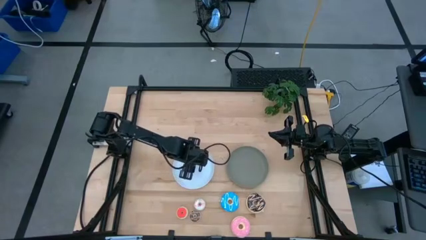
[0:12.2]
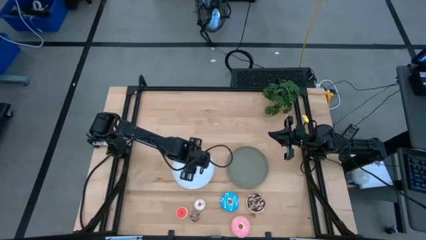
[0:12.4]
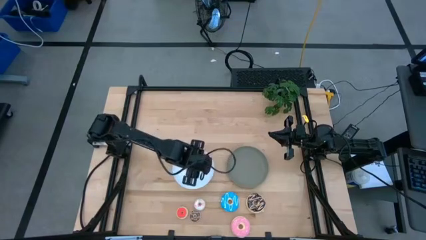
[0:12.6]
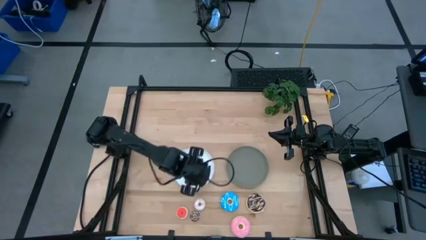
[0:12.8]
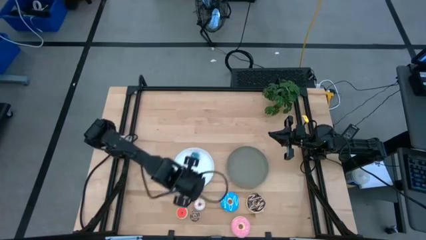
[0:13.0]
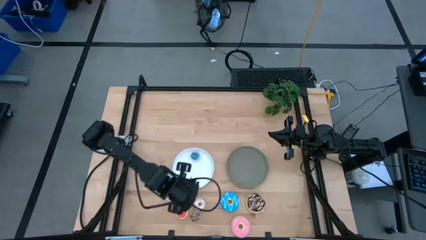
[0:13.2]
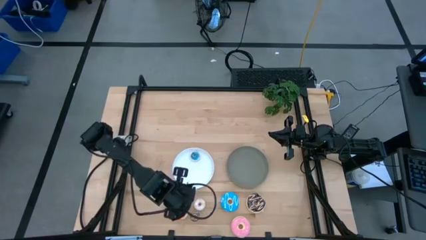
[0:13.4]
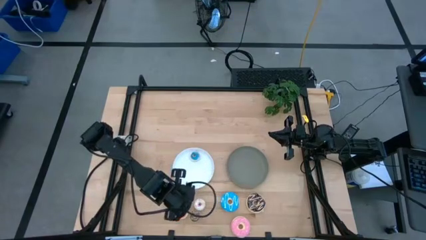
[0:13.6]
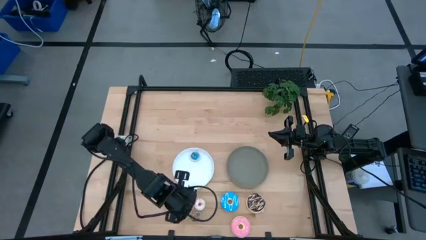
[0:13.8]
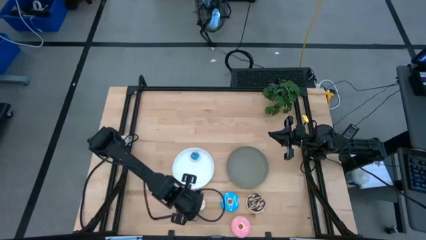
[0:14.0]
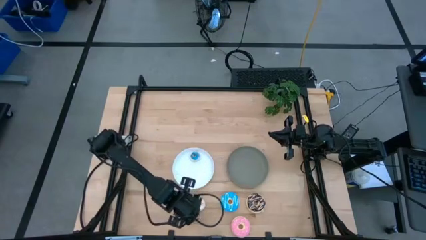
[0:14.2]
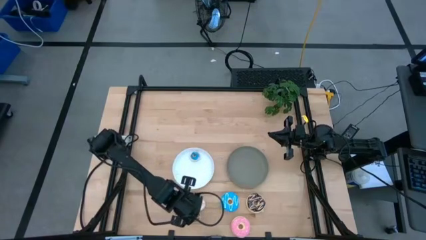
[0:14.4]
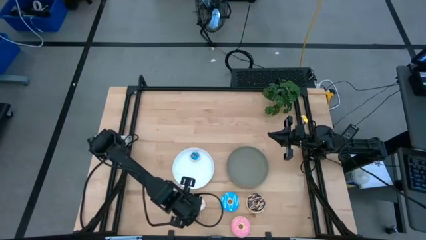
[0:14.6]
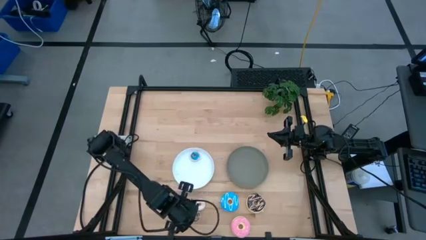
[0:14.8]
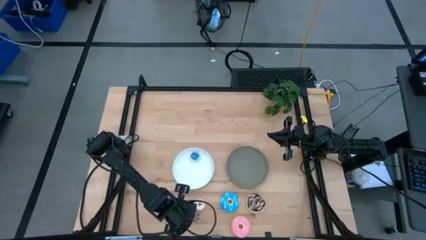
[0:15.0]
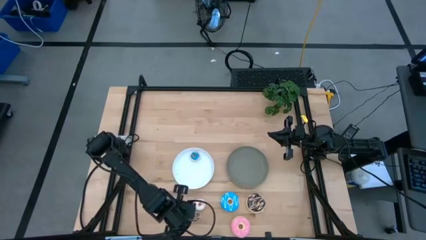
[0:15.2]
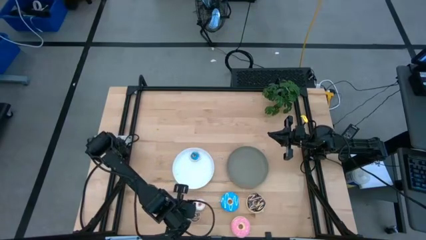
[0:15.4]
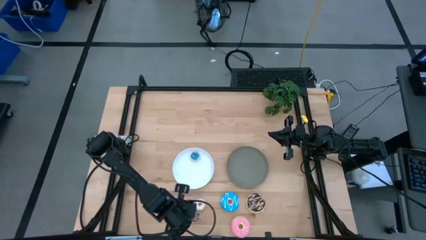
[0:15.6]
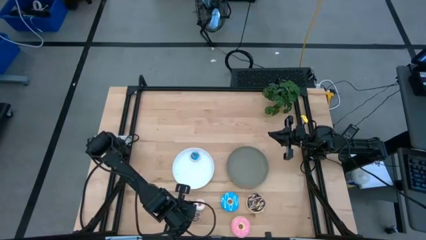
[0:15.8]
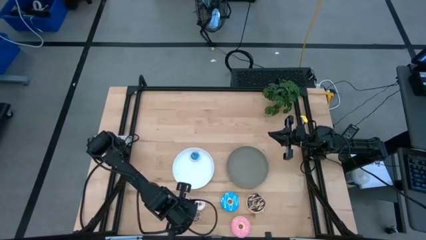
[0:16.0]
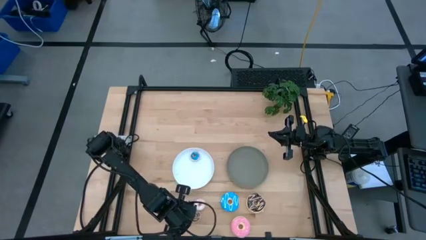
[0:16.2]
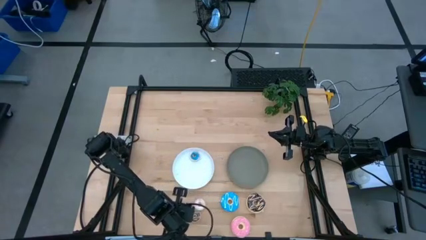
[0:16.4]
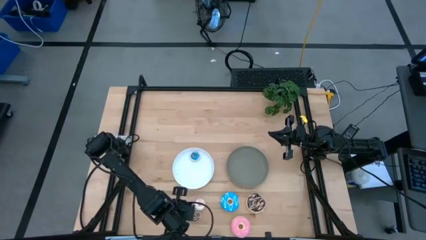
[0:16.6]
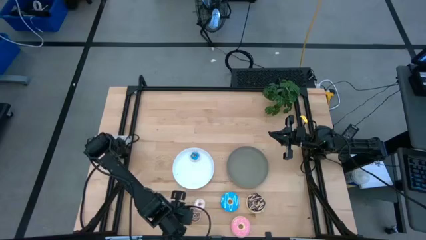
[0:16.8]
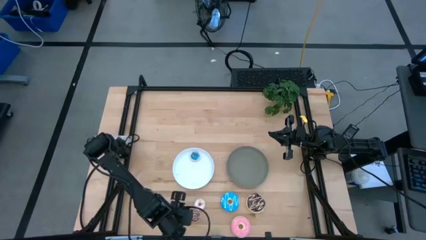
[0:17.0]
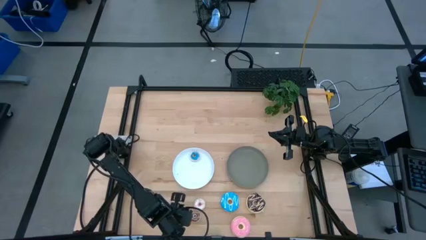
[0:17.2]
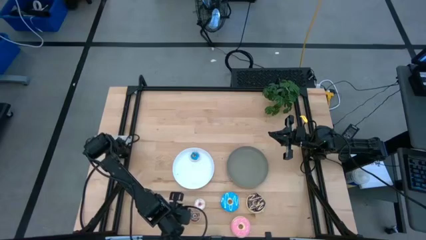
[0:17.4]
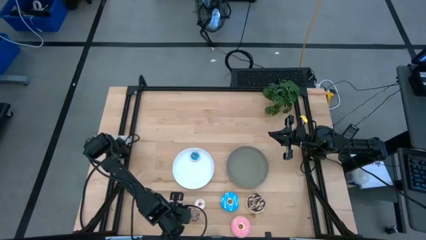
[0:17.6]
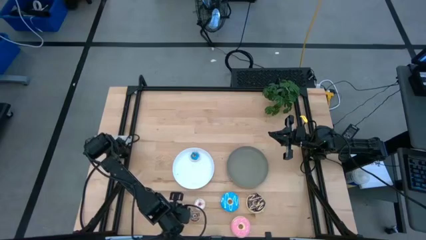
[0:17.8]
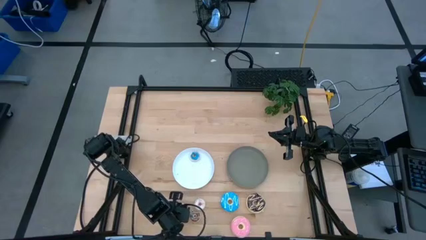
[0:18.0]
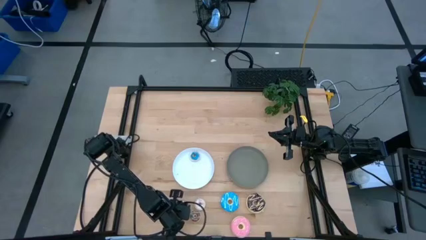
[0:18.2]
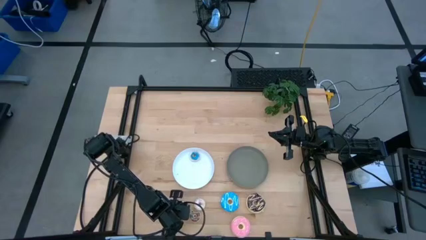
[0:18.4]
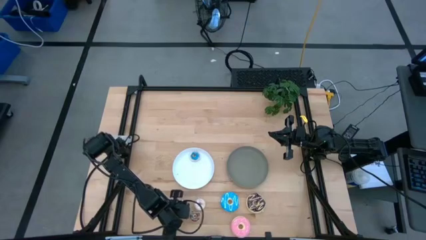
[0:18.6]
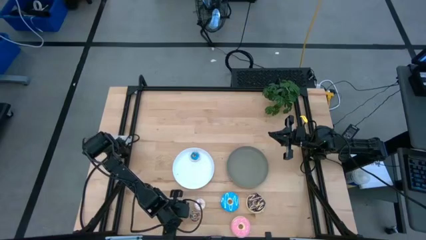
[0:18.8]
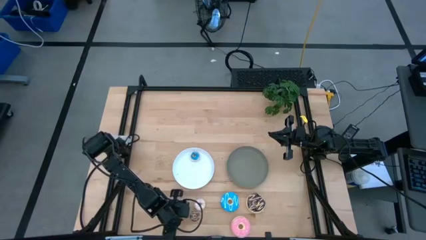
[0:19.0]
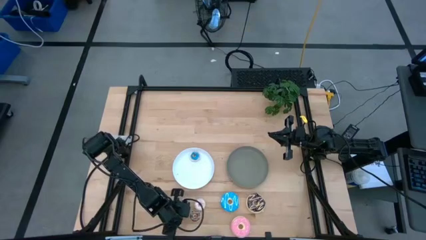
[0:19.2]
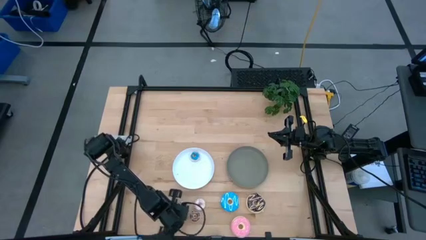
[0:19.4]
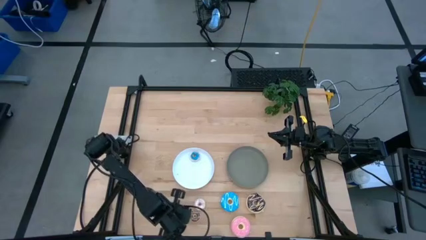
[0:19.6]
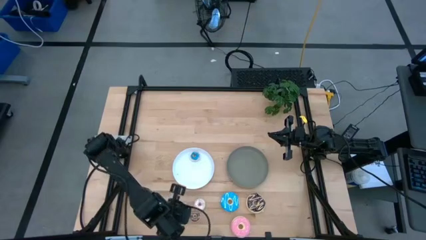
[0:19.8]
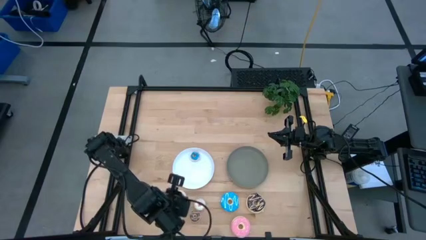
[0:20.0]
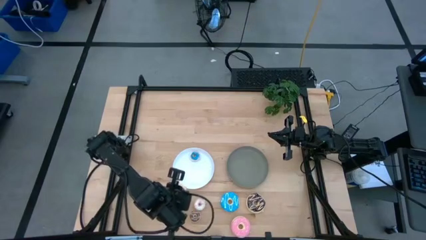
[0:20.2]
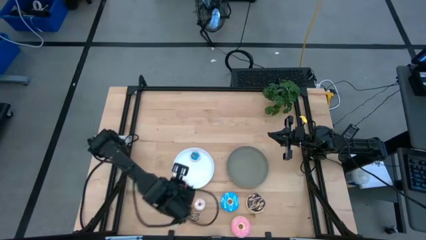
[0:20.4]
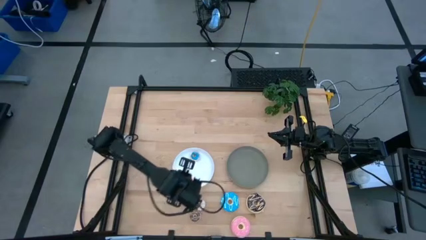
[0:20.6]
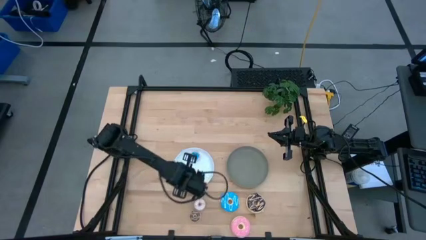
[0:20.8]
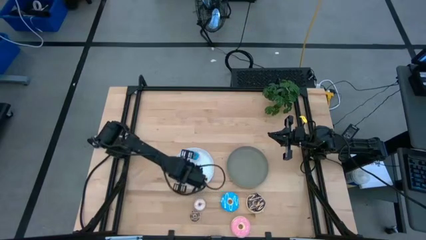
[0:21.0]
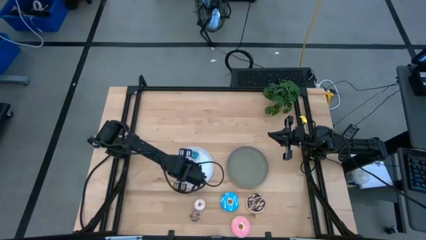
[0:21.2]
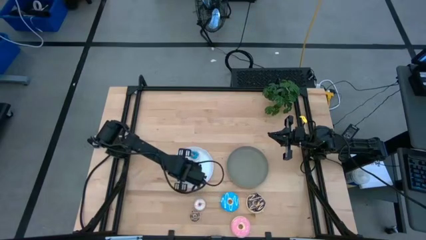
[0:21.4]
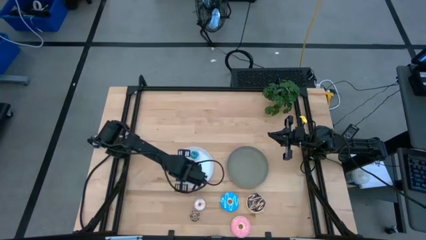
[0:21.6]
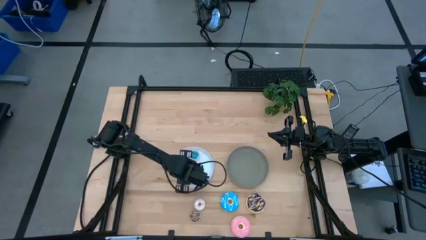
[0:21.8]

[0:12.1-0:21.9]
Task: Pick & Place donuts
Put the small orange doughnut on the white plate

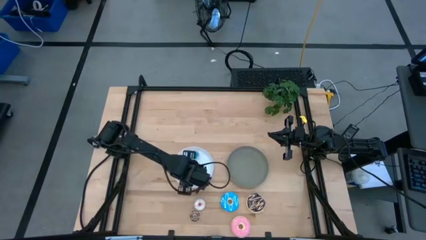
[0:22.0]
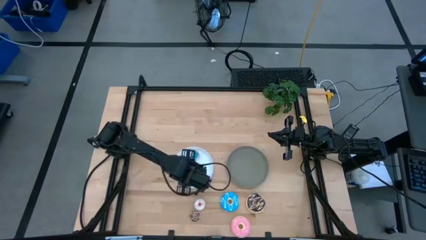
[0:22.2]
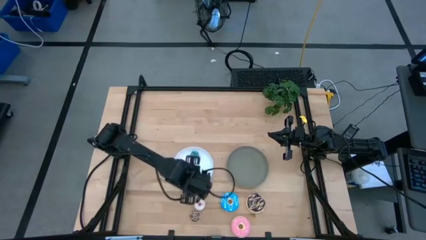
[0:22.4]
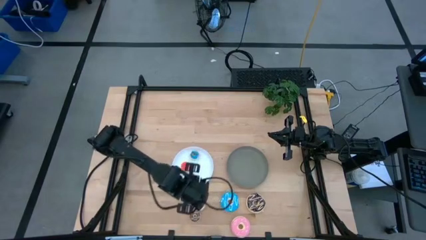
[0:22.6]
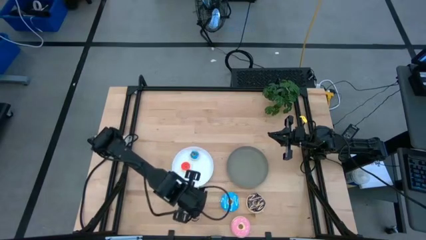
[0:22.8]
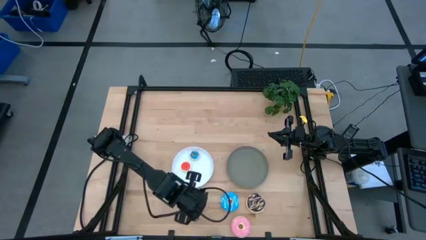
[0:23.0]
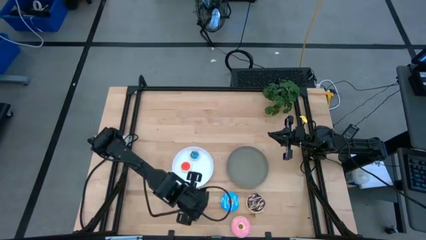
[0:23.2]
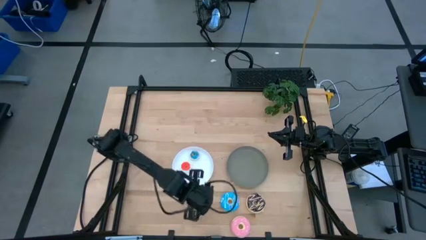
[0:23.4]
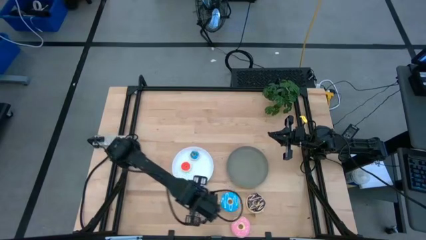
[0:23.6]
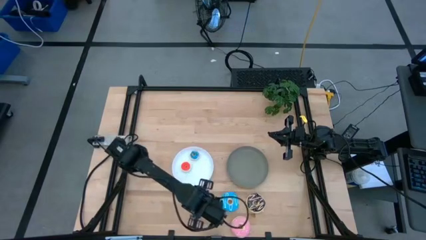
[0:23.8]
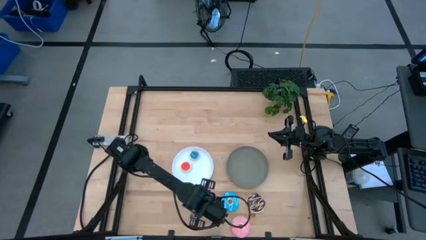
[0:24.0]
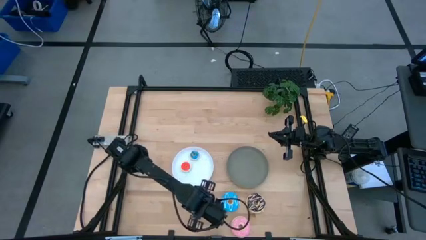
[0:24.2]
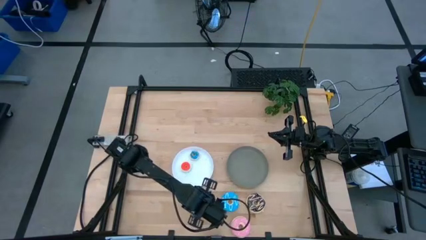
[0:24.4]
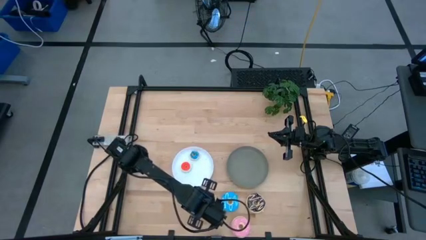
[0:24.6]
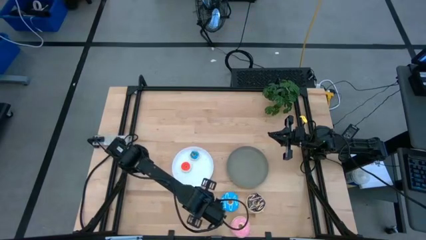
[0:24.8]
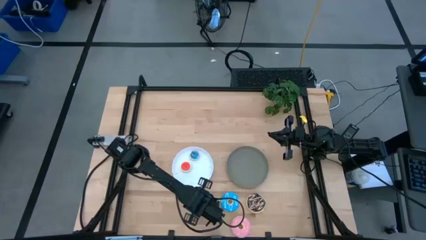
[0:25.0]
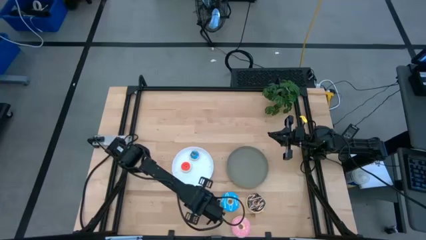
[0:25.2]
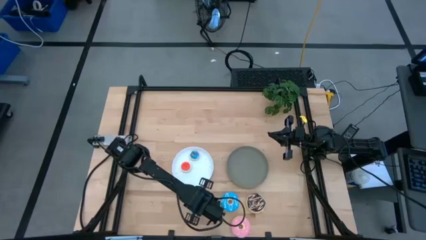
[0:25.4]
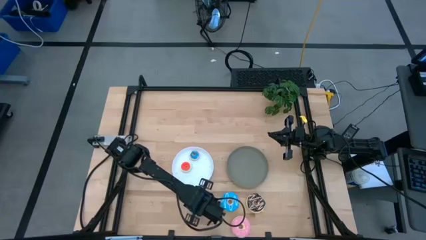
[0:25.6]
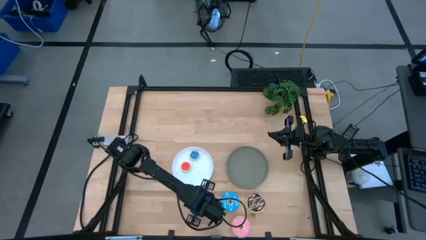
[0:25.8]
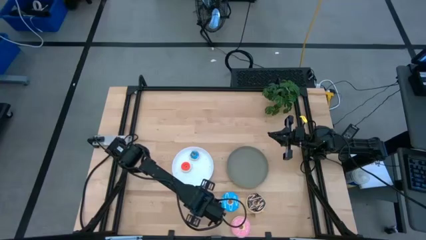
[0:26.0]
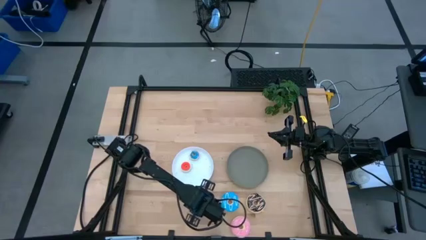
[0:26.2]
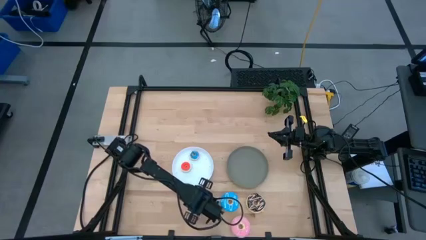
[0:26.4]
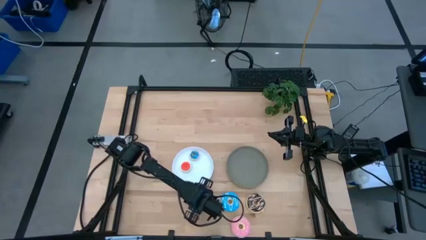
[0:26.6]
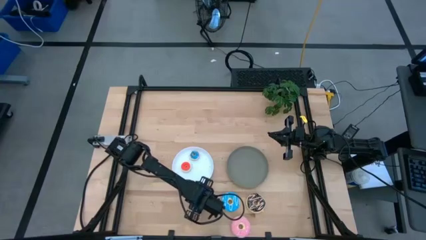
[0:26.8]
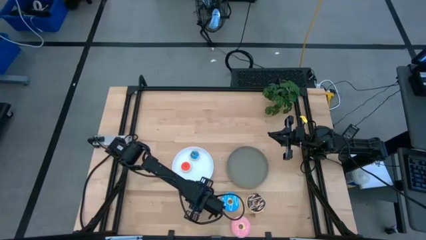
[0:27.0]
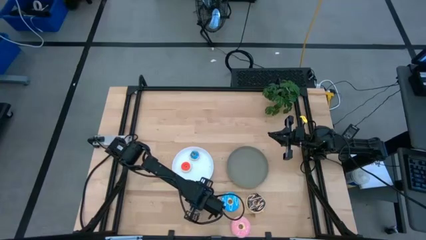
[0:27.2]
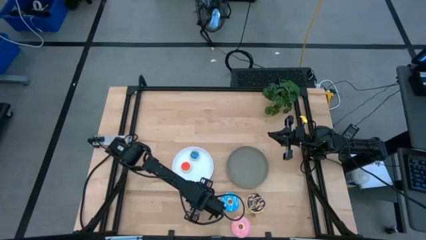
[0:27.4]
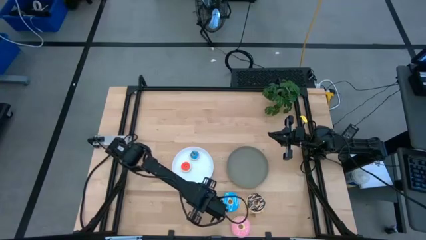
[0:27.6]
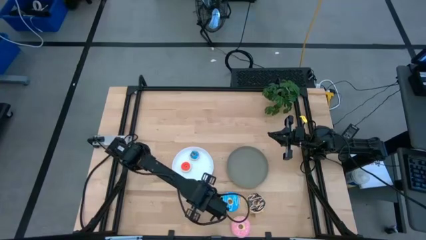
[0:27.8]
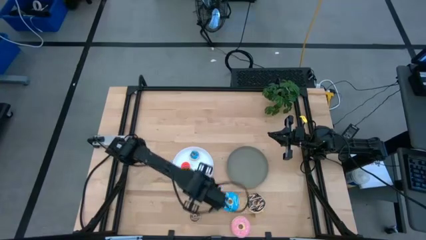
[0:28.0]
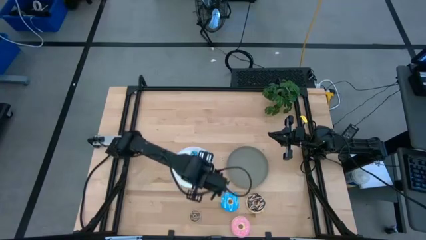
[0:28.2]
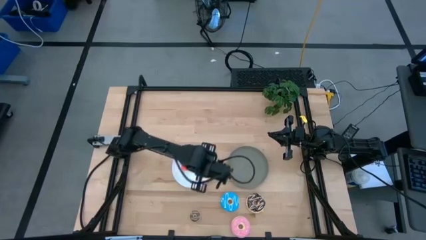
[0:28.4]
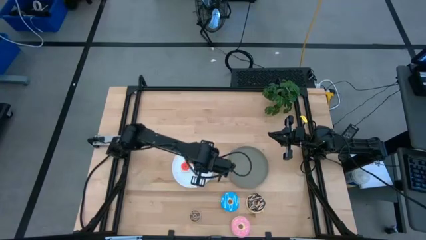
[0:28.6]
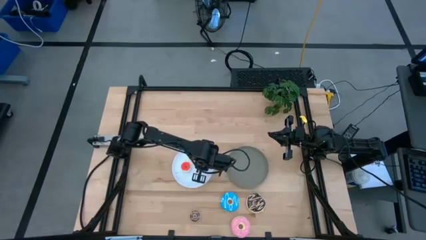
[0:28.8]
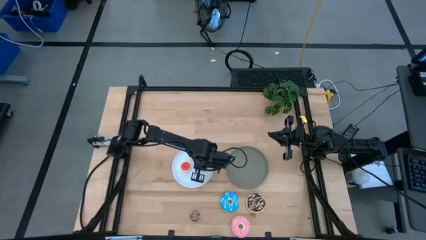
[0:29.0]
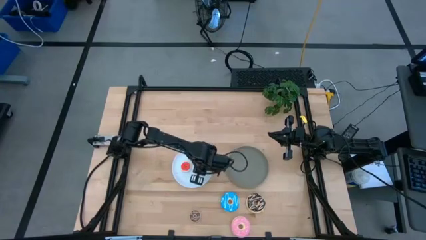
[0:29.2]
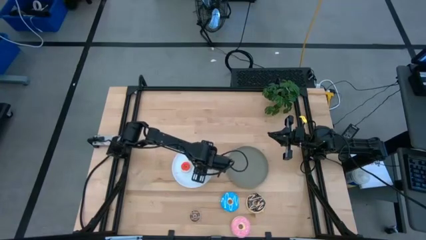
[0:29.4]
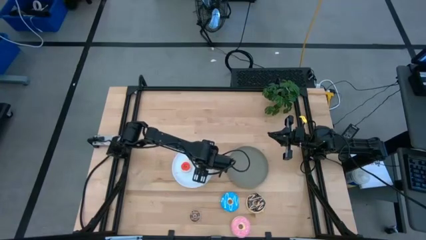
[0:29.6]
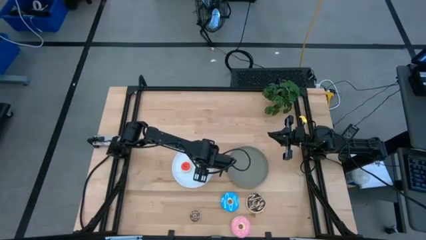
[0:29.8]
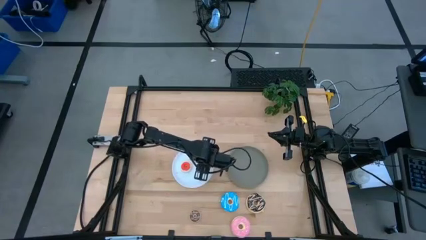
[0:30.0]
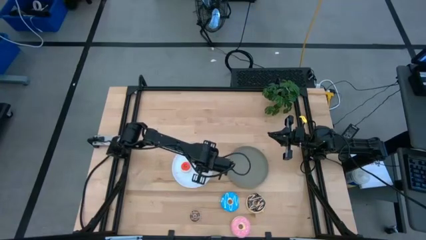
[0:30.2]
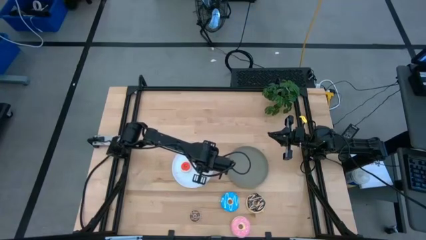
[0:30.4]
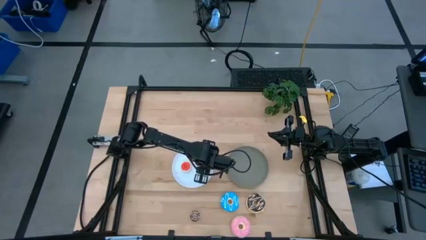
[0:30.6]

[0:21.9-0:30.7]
Put the small white doughnut on the white plate
